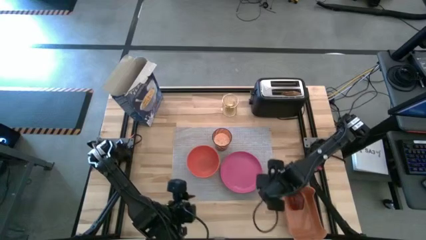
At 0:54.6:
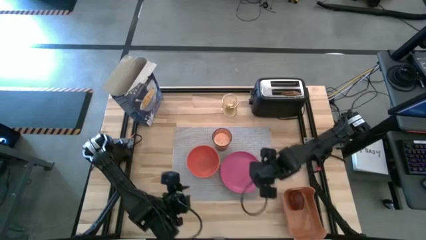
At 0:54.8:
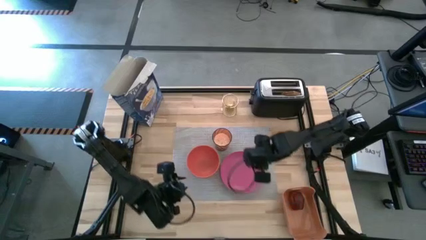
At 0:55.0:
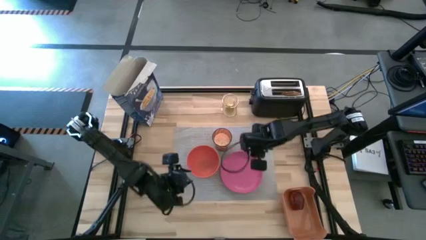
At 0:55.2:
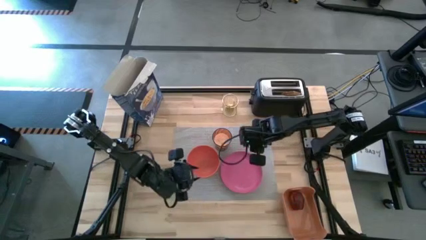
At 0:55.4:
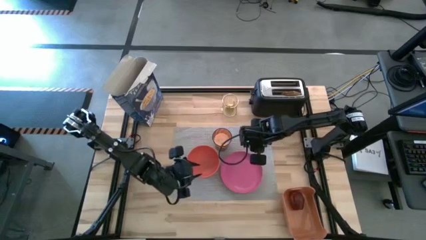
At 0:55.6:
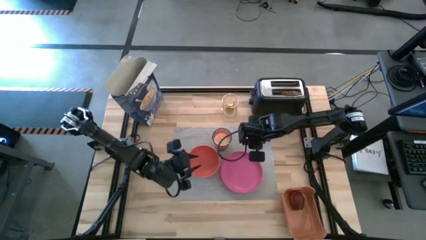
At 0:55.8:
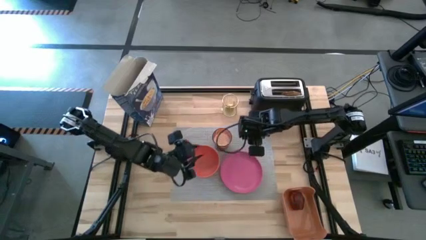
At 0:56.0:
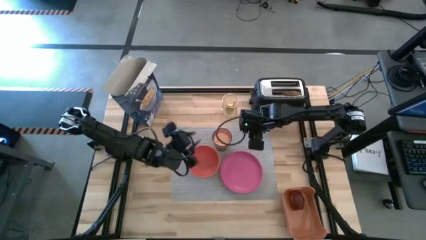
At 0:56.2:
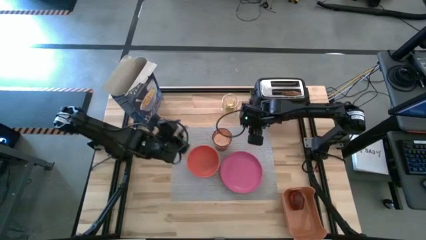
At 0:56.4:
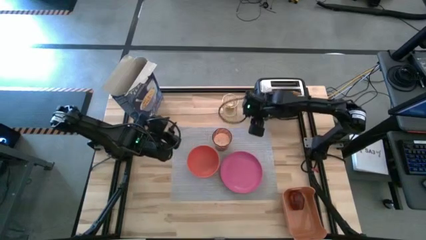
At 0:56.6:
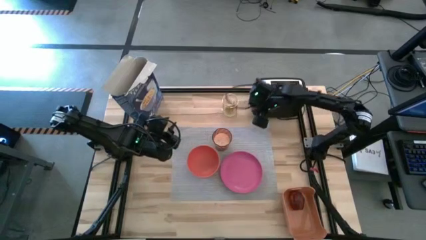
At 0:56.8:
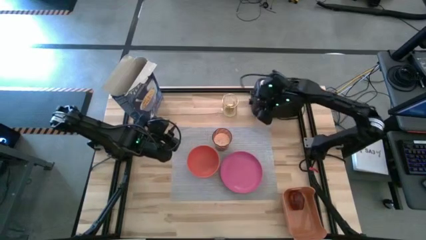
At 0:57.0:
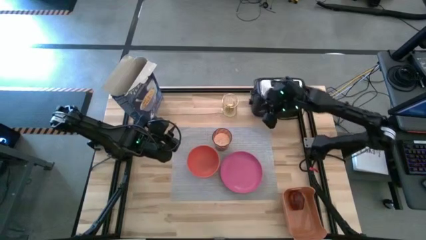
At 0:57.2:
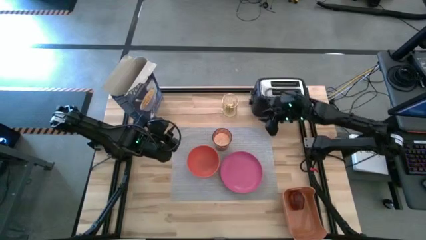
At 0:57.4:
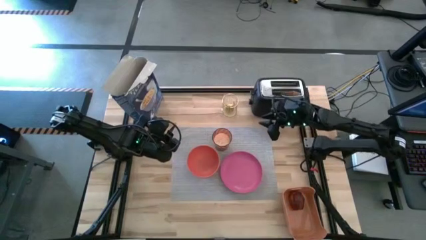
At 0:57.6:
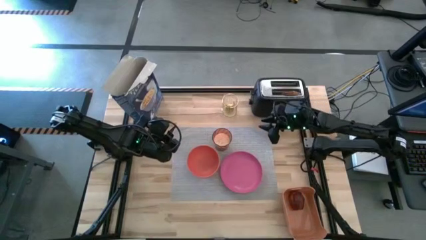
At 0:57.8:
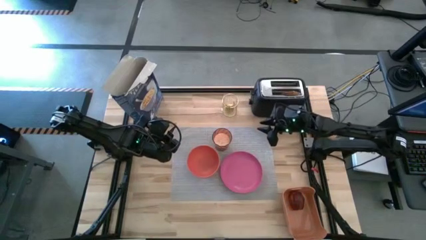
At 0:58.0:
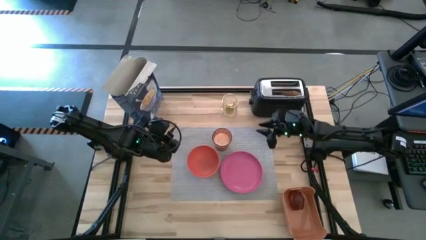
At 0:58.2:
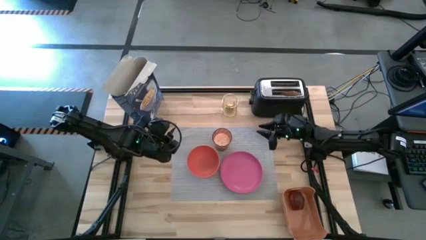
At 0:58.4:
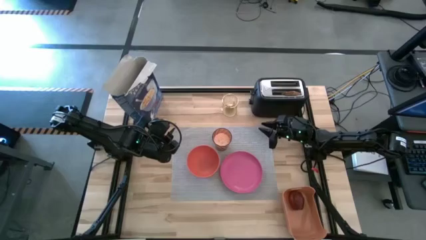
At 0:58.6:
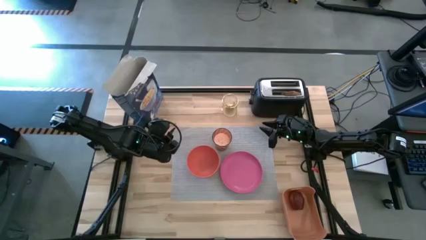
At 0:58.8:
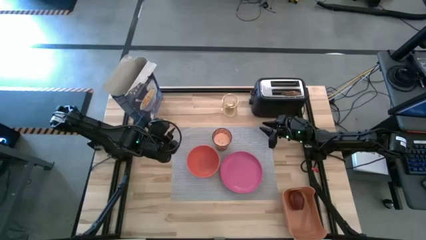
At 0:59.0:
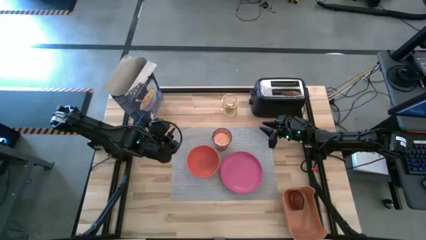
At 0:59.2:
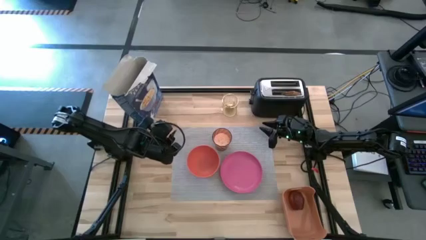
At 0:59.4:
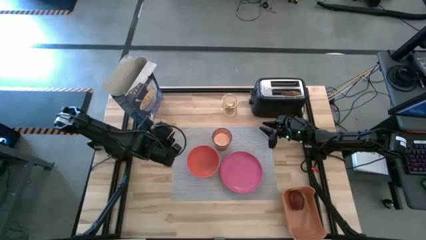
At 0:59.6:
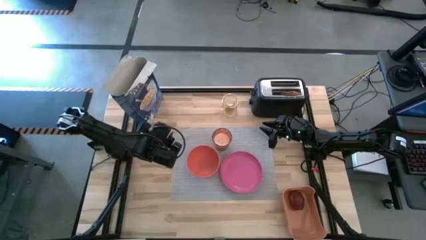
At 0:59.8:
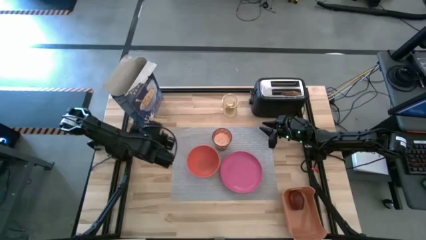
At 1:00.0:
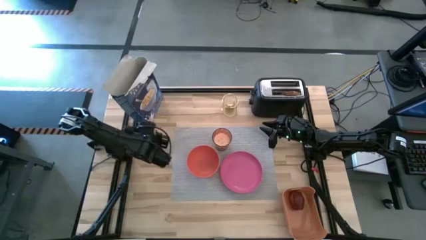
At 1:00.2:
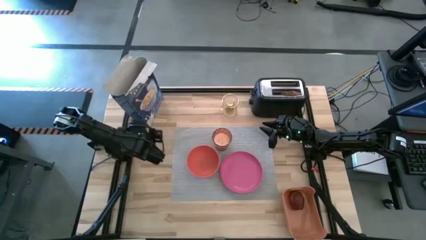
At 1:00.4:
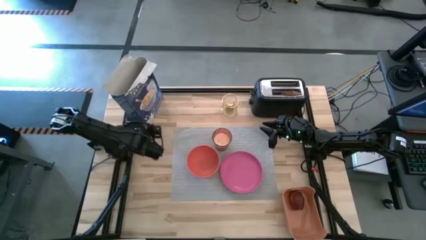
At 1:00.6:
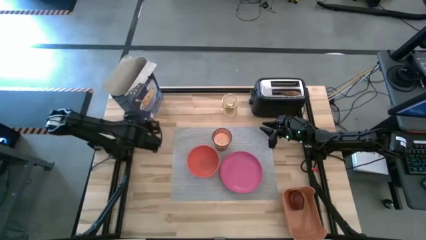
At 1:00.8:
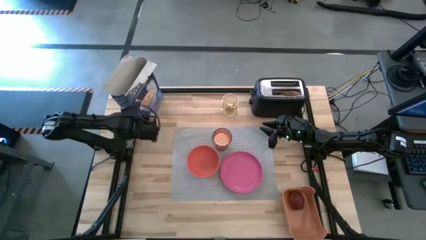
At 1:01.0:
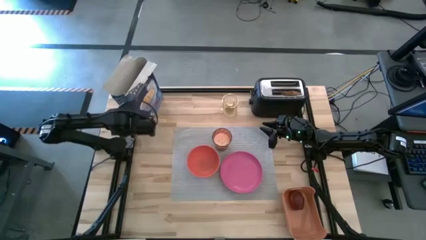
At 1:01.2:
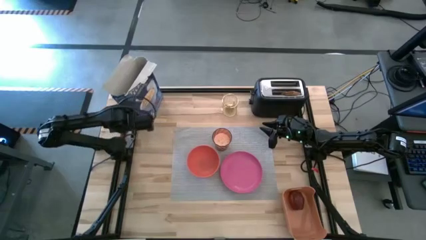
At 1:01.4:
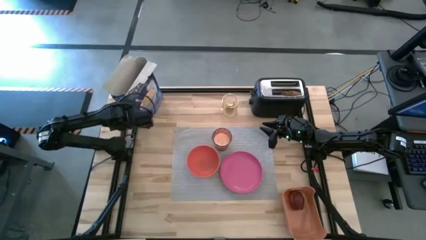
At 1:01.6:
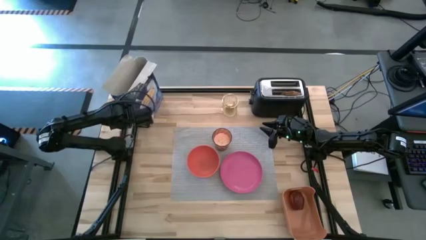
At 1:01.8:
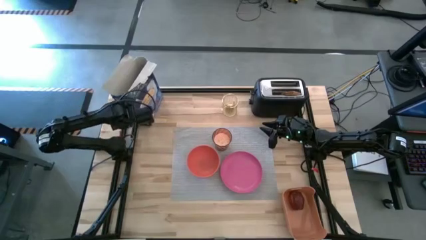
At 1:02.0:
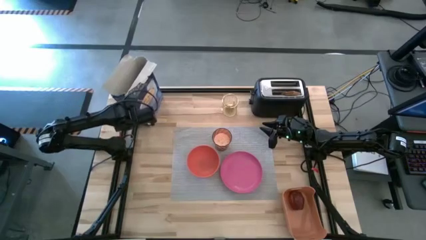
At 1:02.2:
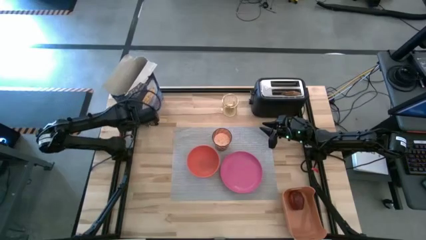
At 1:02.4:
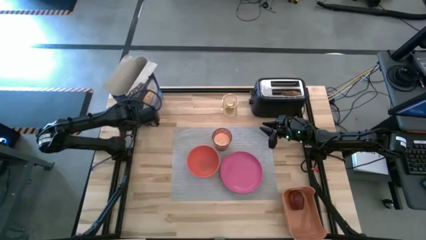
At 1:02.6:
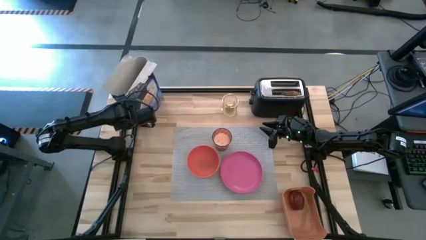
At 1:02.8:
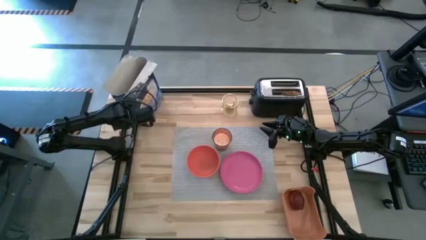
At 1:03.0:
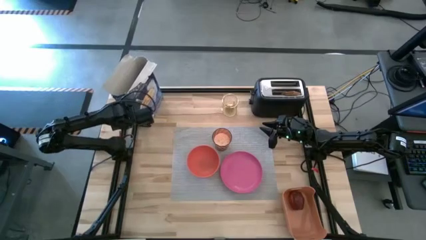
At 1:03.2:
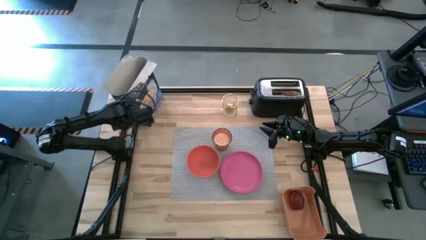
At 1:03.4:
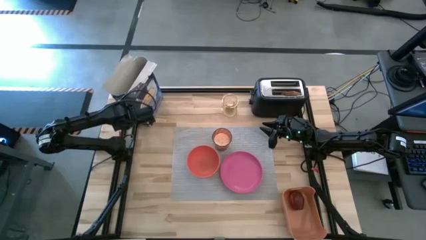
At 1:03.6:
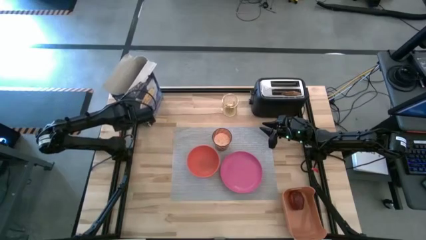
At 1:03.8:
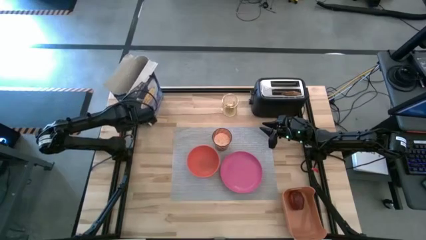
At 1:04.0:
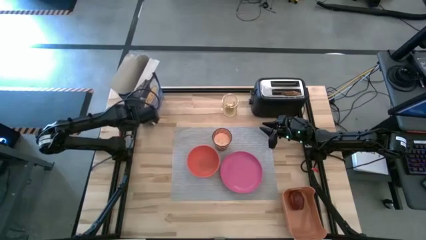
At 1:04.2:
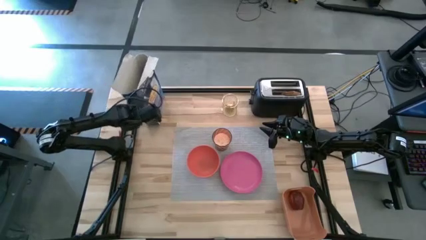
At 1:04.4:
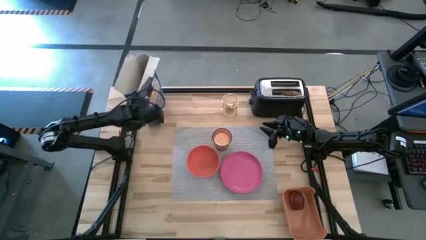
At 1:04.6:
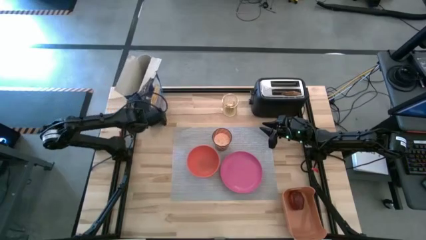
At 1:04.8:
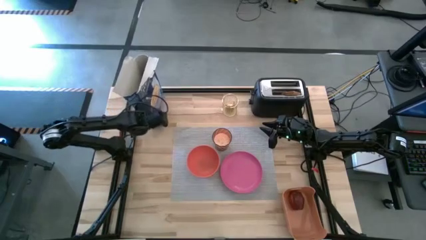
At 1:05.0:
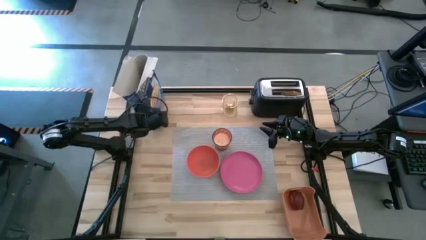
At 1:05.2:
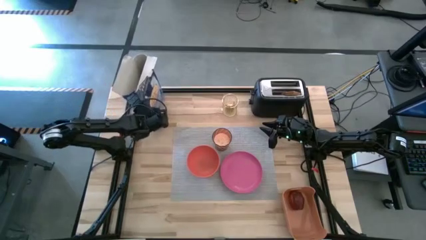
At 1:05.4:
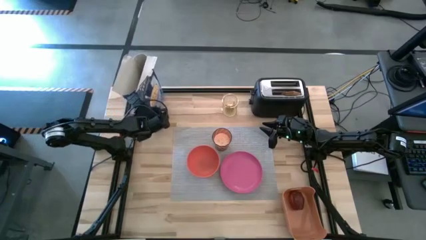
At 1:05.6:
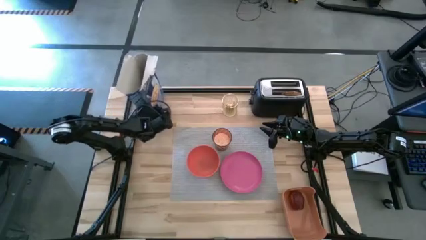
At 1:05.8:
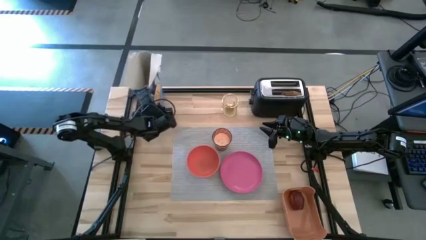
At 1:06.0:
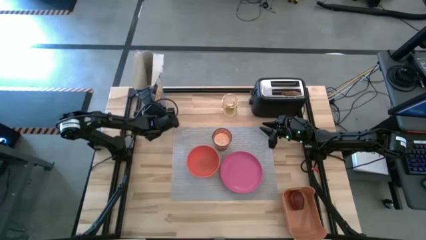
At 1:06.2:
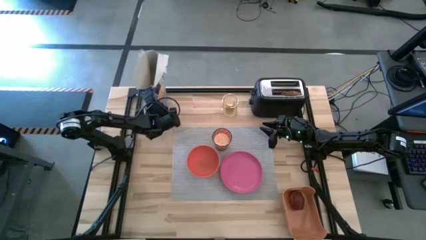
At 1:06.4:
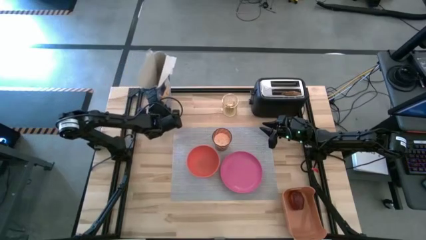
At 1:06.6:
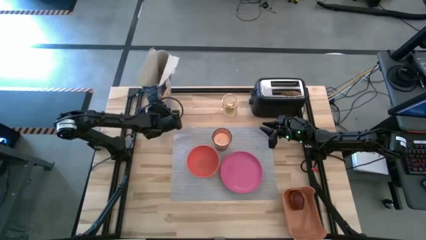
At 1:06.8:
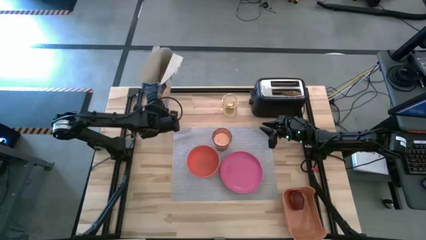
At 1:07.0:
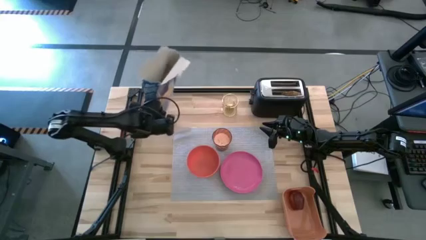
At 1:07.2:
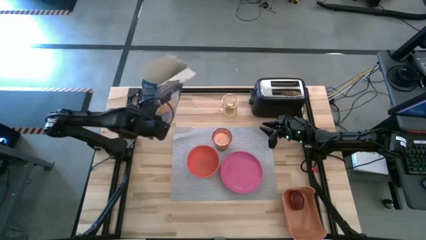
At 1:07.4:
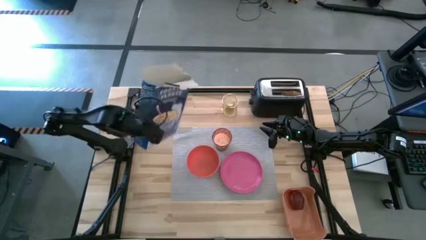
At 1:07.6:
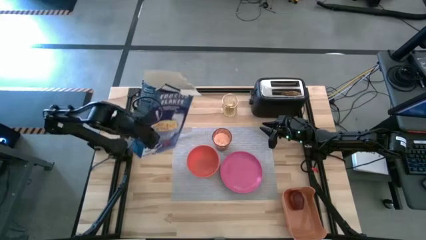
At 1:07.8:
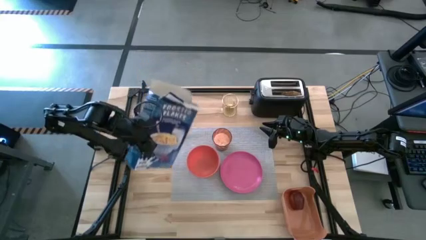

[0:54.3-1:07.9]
Task: Arrange a breakfast setting
Pour the cereal from the blue cereal box into the orange bowl
